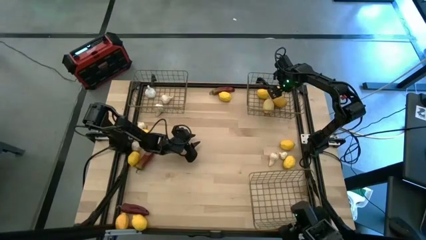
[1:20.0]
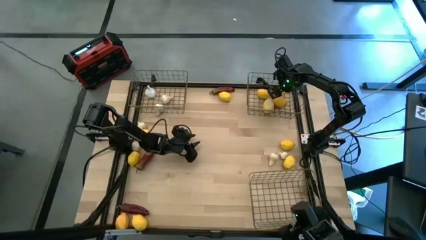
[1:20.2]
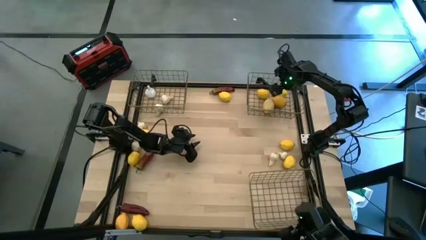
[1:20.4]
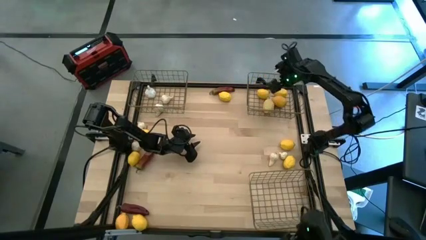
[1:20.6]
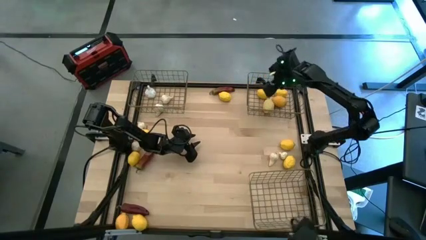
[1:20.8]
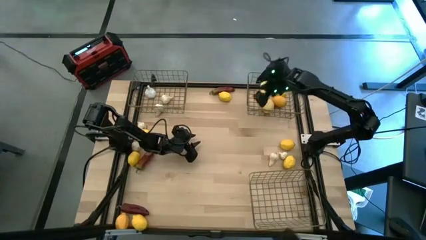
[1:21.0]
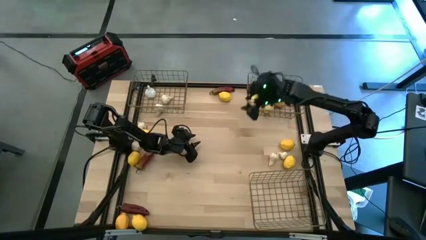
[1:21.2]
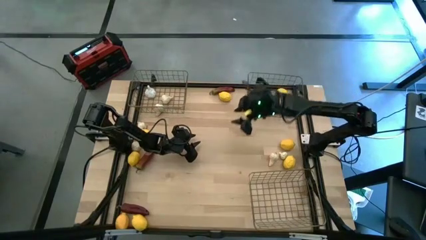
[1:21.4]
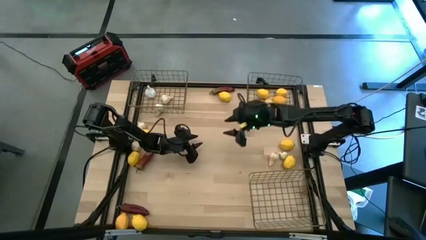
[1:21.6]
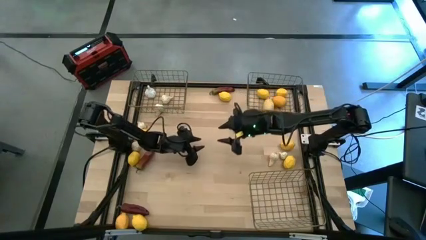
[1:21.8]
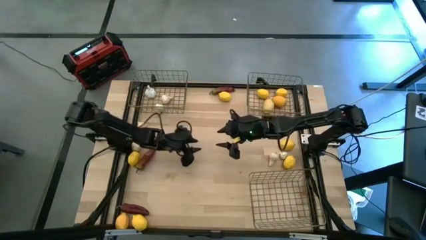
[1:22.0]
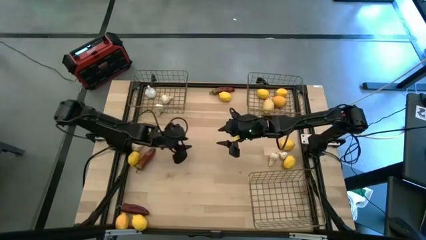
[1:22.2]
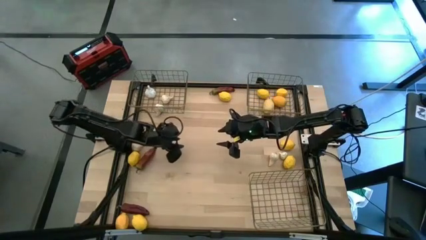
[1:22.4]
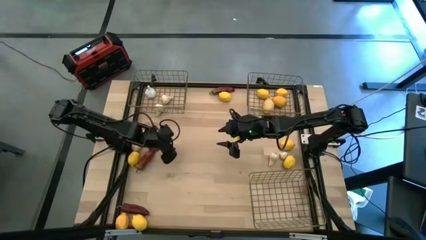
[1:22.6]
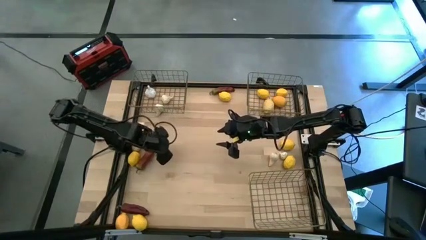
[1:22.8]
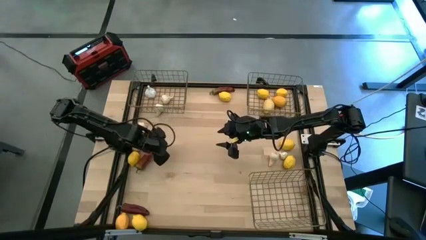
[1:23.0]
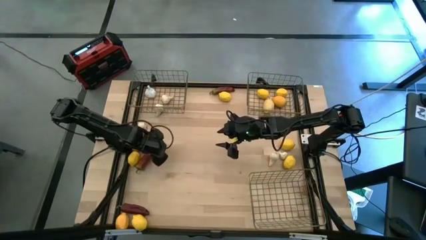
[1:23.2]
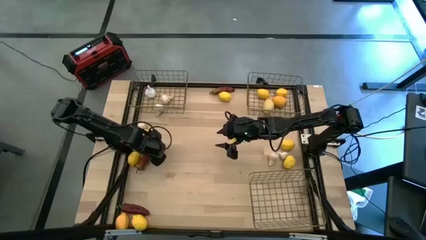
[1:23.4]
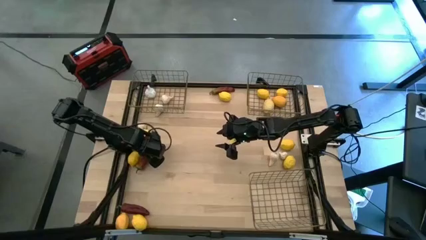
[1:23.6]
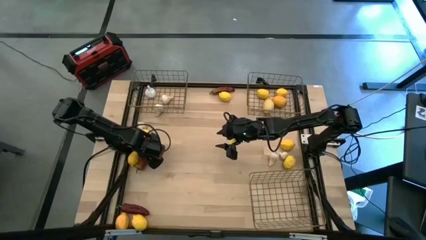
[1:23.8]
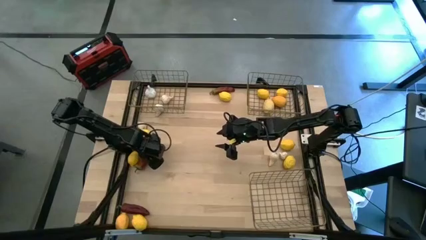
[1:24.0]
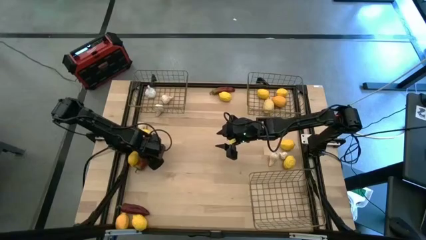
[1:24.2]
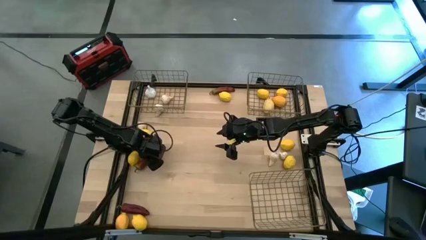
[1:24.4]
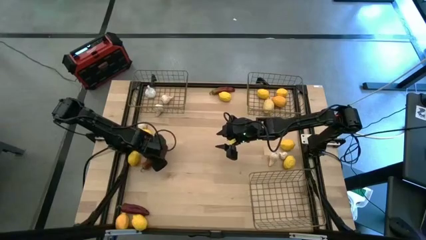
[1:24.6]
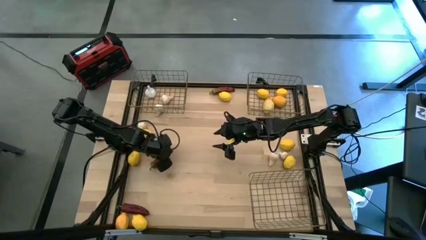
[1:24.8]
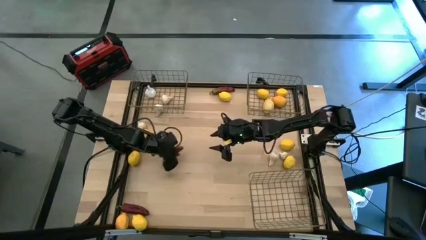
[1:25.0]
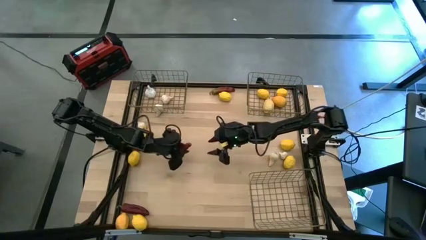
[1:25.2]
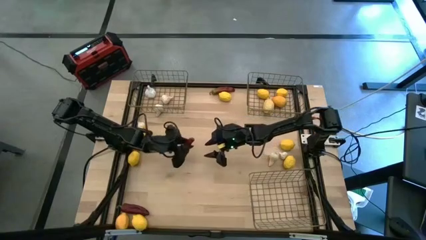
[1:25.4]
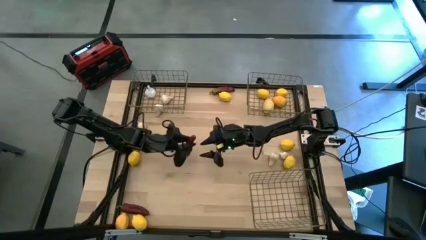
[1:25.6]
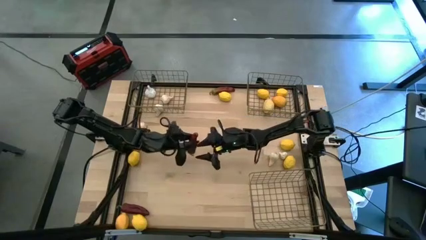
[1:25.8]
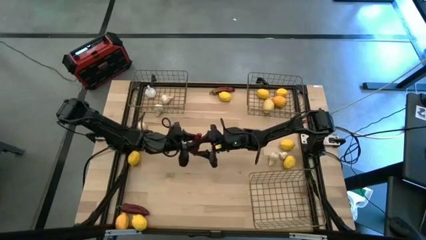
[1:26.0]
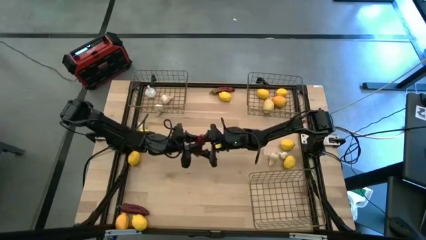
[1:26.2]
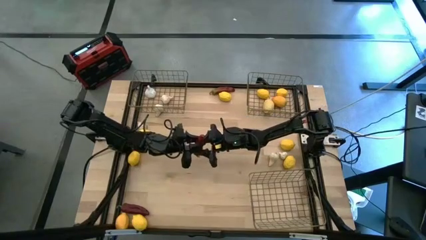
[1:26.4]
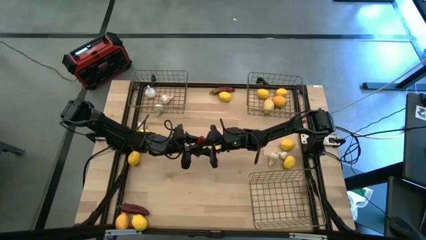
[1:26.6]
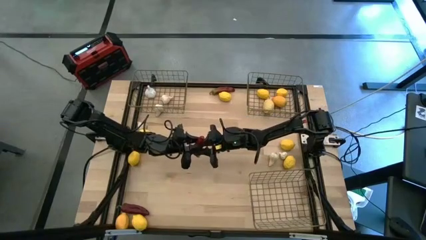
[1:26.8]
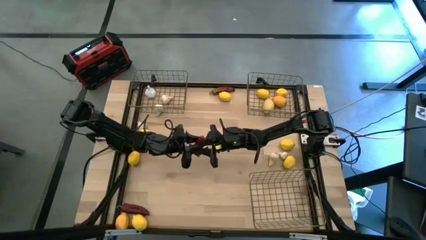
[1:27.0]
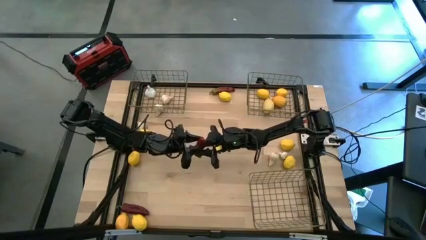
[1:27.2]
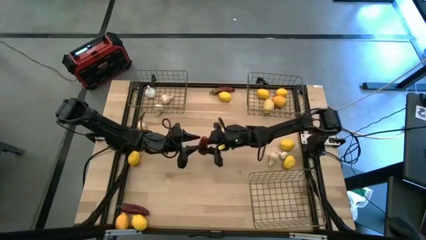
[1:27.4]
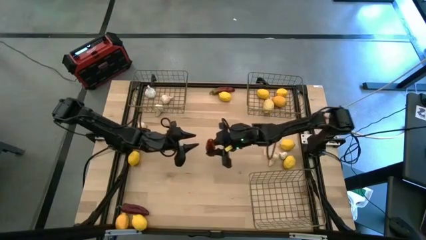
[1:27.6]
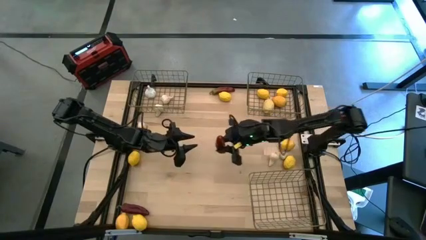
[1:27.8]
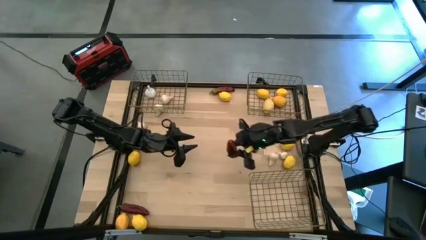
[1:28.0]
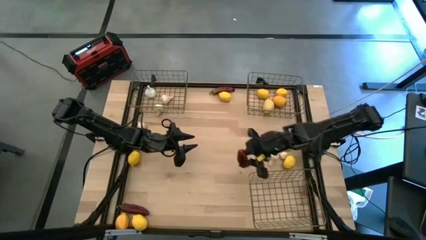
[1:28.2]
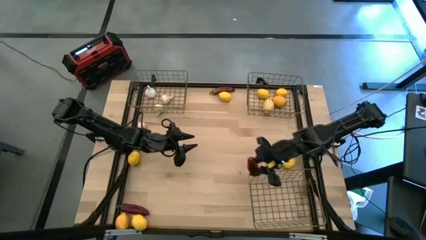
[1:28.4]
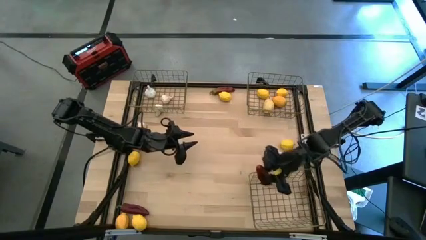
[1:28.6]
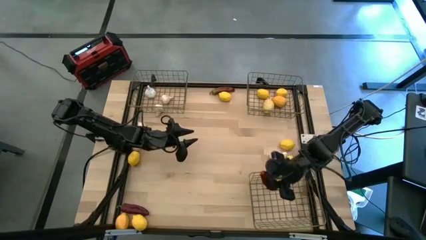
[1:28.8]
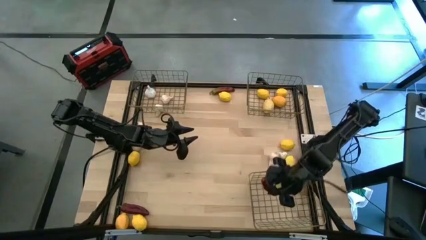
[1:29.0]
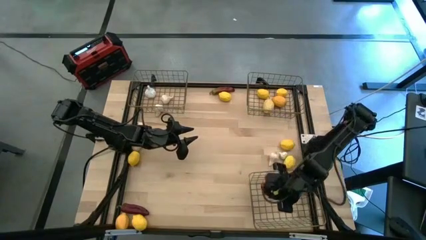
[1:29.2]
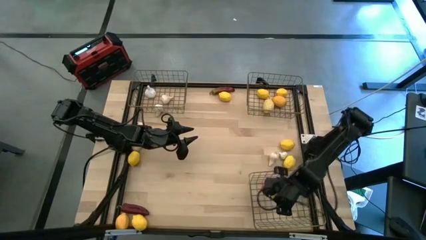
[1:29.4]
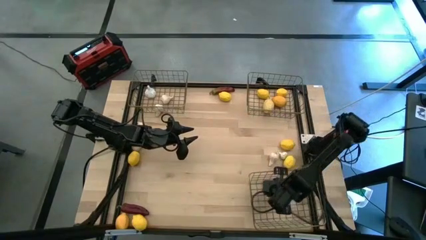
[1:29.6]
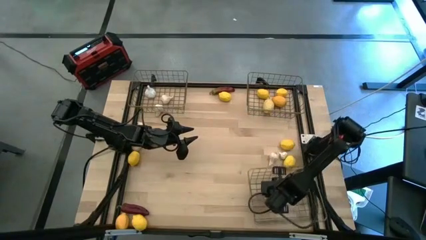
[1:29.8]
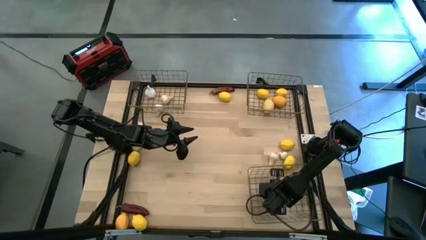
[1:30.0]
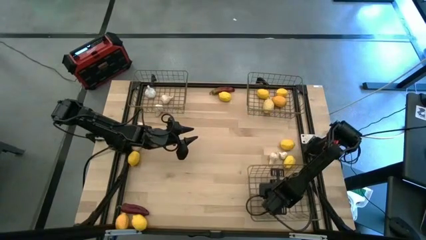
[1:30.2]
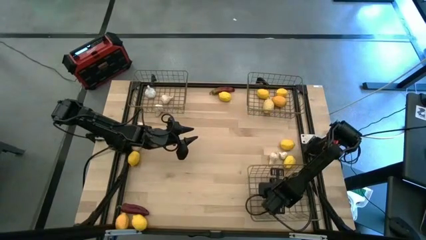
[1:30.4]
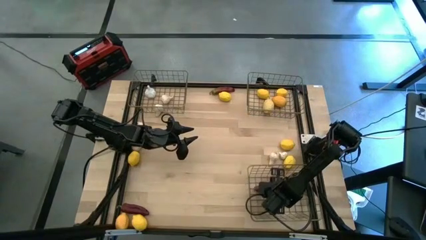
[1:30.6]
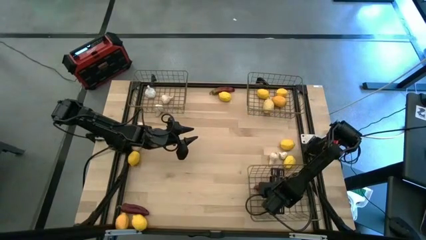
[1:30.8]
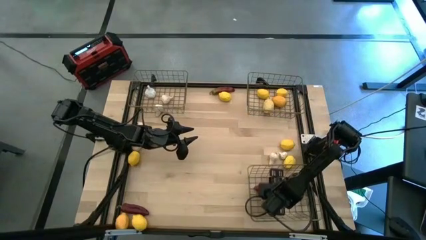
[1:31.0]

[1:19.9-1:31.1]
Task: Sort produce into baskets
Put the red chili pepper into the bottom wire basket

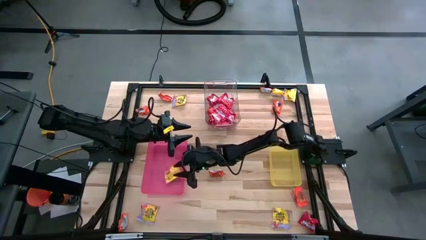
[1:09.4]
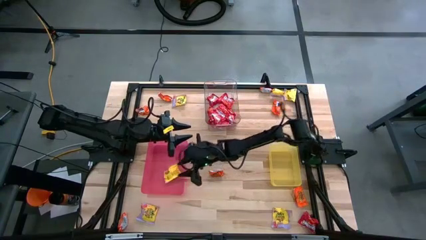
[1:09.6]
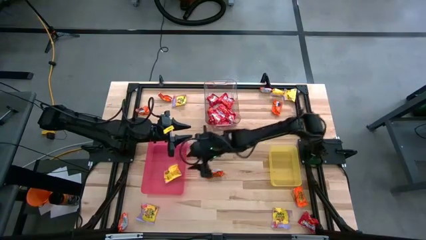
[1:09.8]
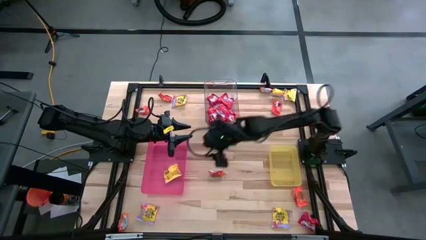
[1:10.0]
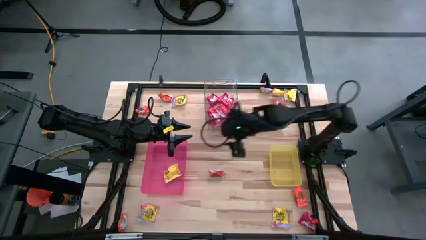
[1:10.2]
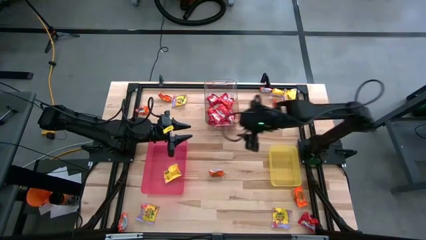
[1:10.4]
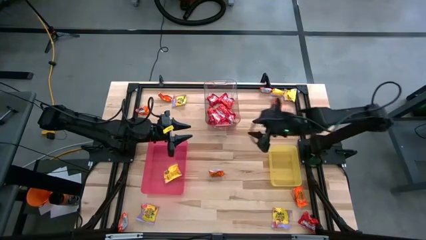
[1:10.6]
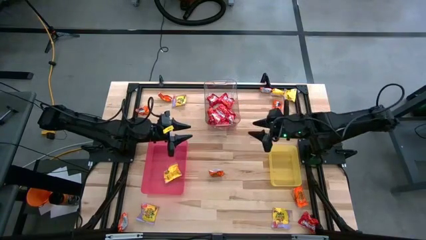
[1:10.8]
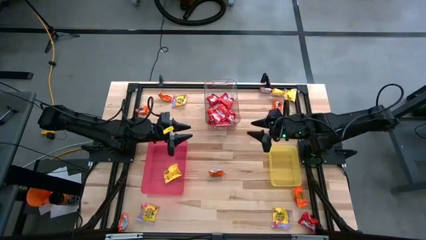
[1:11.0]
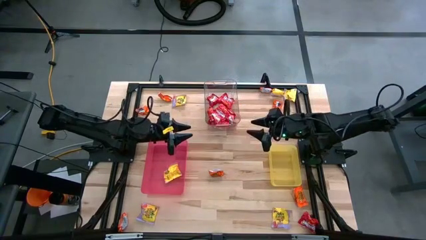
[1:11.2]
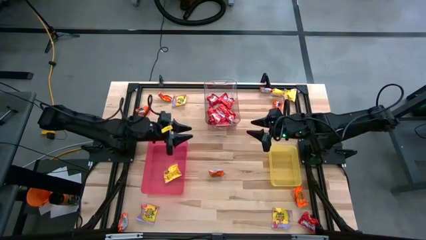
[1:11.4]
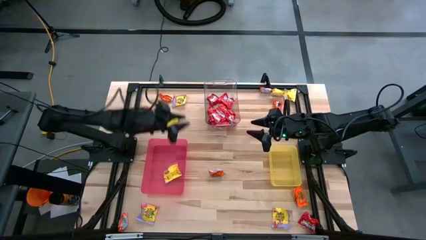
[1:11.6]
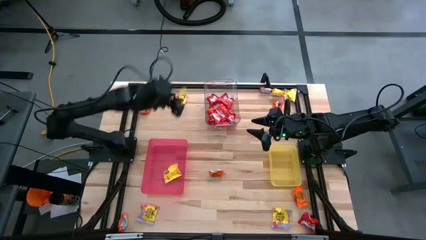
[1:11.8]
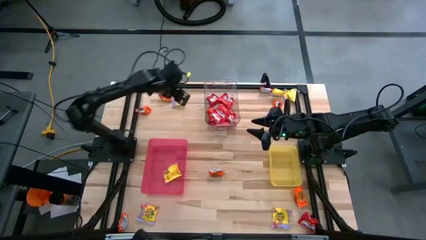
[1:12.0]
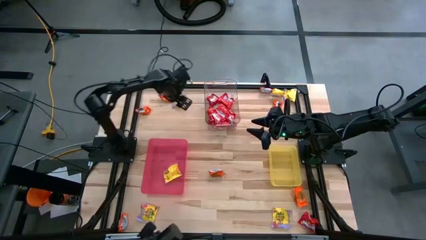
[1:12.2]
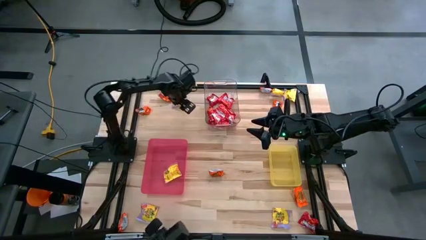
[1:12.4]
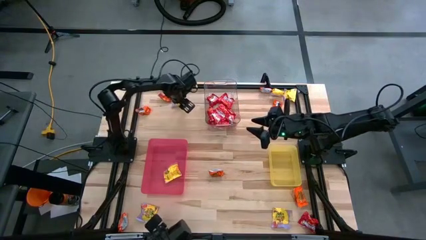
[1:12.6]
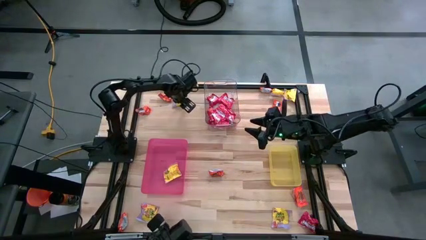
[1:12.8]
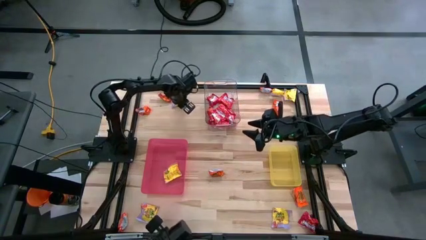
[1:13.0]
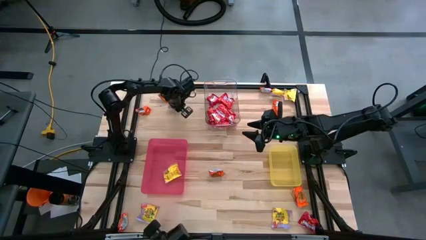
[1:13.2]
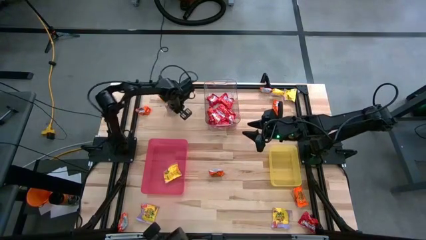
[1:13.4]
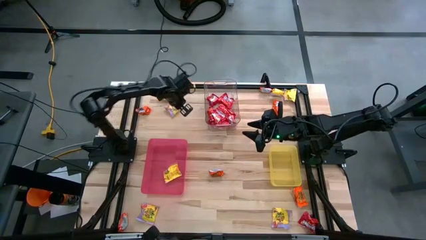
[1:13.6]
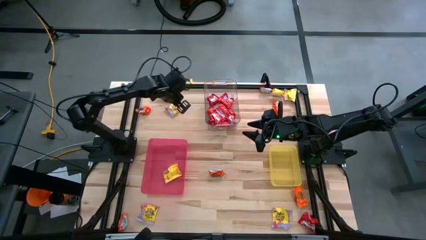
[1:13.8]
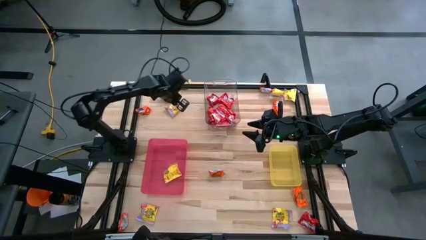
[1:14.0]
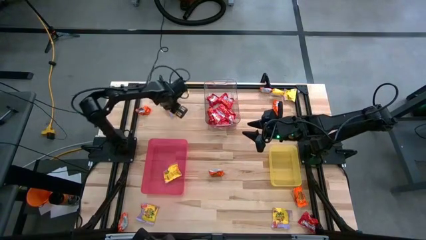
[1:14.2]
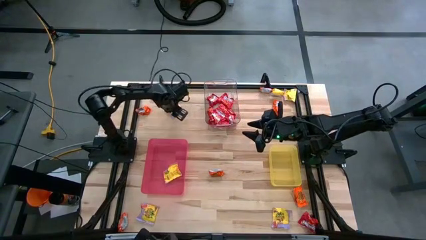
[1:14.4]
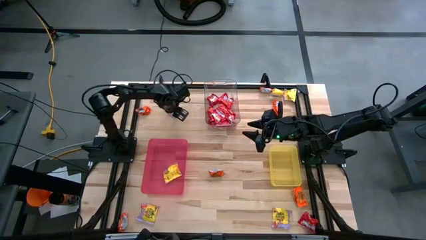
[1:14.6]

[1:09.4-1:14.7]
Task: Sort candy
Put the yellow candy into the pink bin

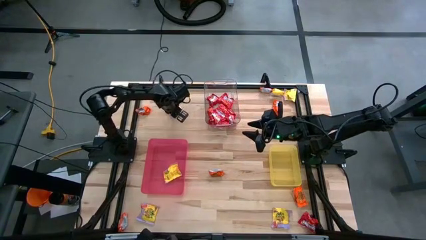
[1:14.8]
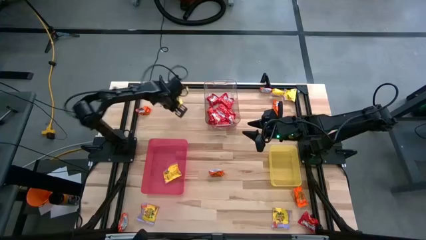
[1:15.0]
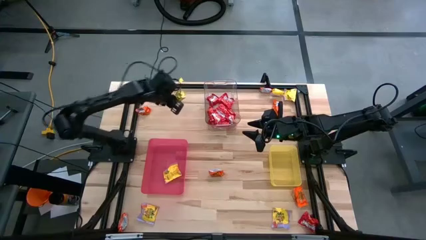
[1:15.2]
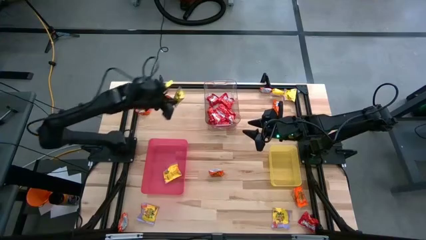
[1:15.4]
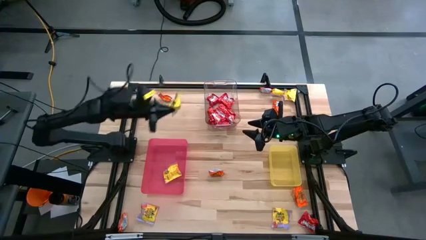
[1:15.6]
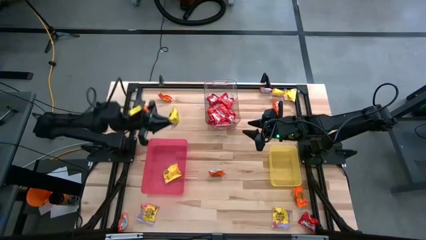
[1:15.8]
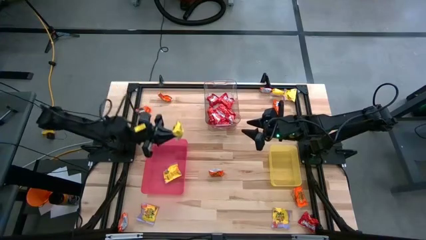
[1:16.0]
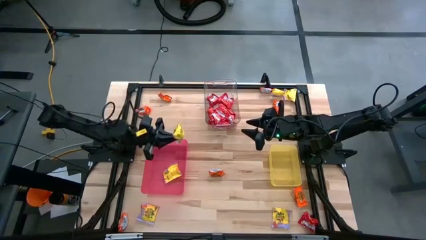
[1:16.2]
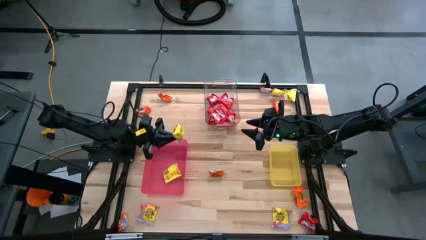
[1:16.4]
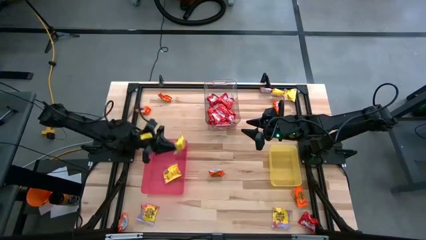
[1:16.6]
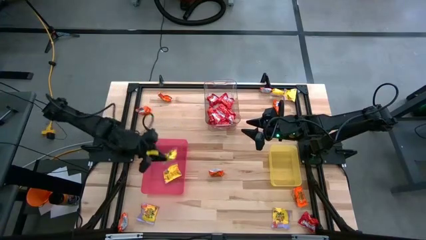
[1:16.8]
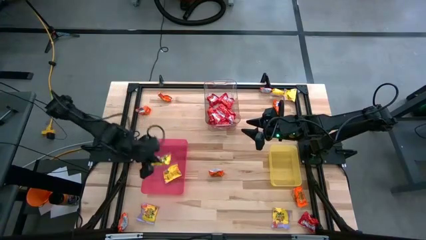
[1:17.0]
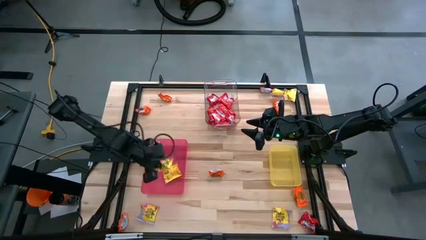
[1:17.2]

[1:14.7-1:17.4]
Put the yellow candy into the pink bin
